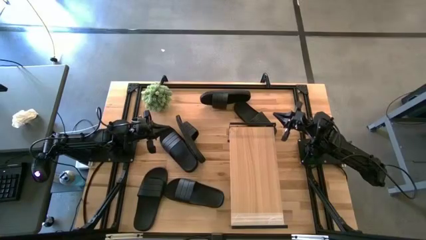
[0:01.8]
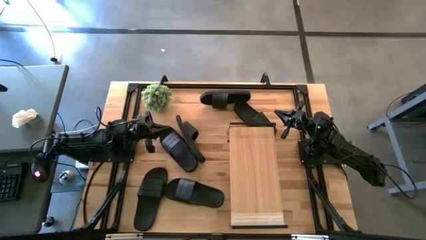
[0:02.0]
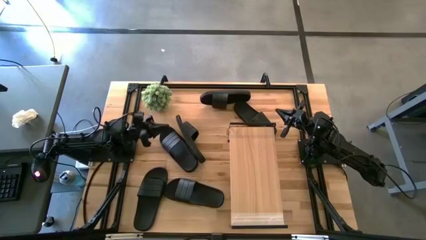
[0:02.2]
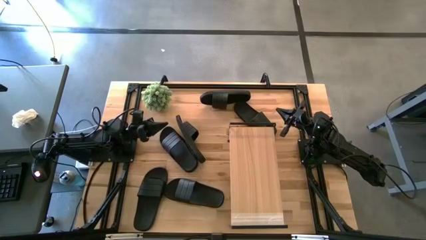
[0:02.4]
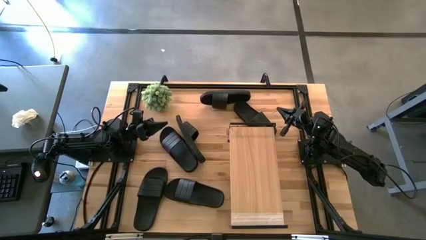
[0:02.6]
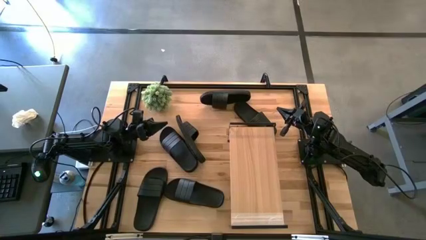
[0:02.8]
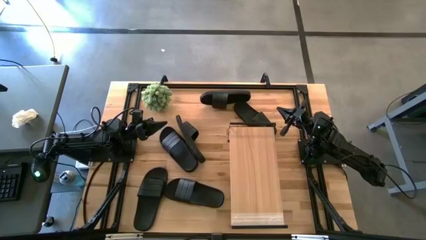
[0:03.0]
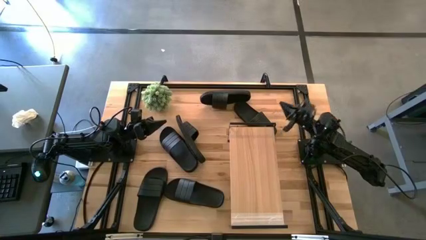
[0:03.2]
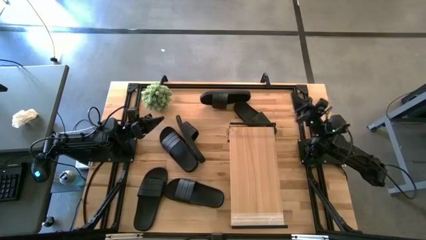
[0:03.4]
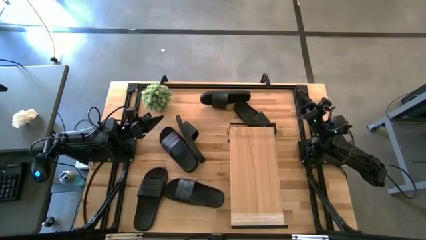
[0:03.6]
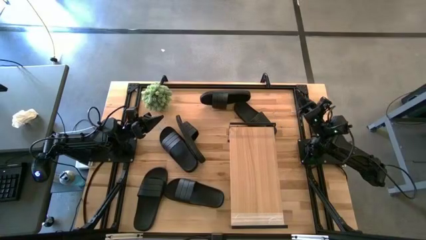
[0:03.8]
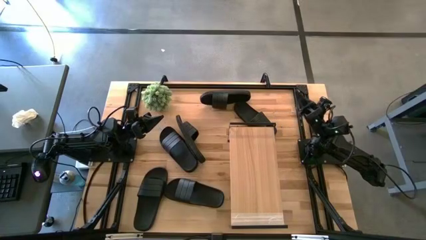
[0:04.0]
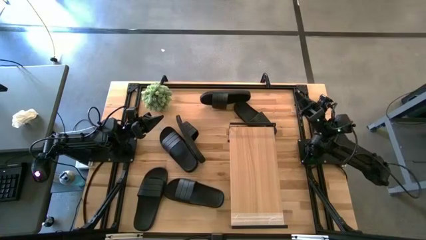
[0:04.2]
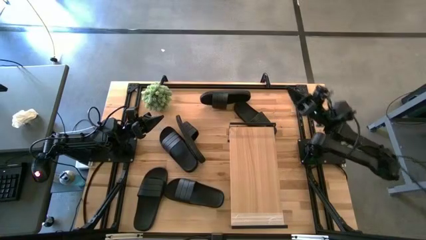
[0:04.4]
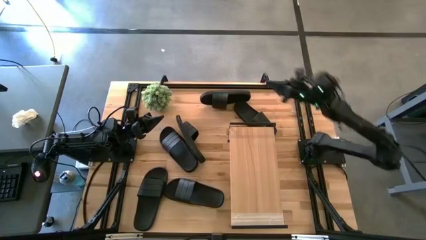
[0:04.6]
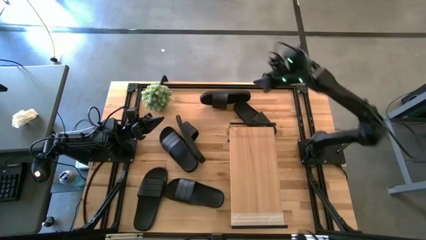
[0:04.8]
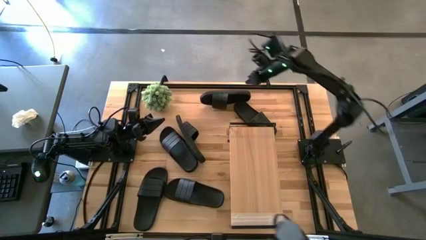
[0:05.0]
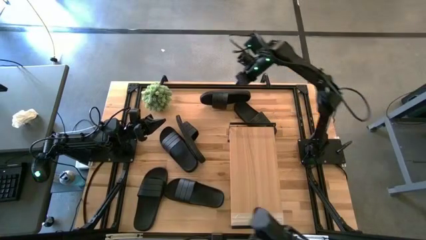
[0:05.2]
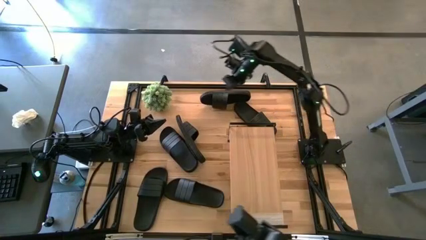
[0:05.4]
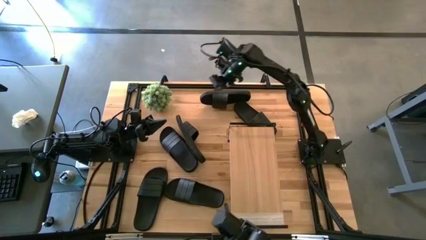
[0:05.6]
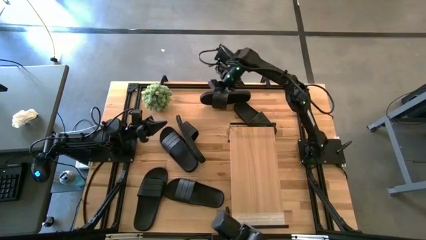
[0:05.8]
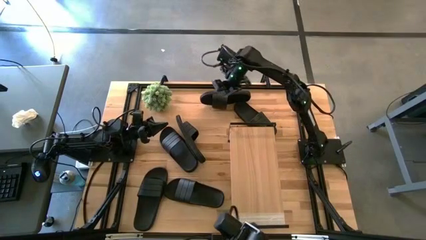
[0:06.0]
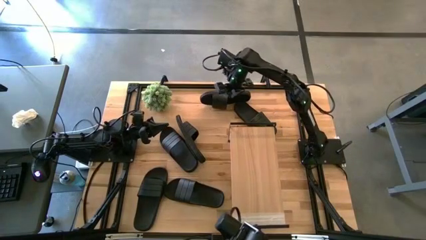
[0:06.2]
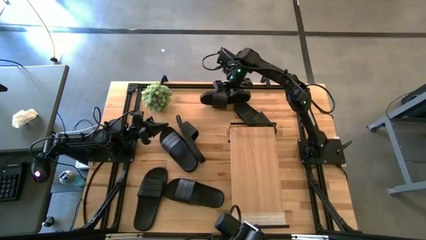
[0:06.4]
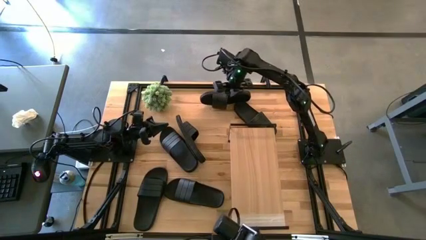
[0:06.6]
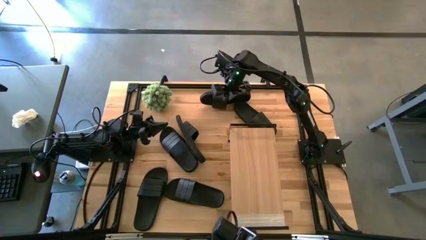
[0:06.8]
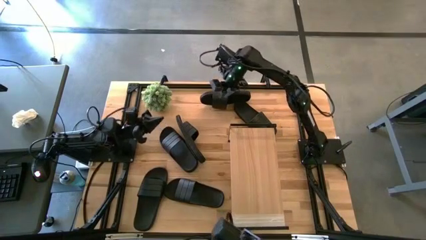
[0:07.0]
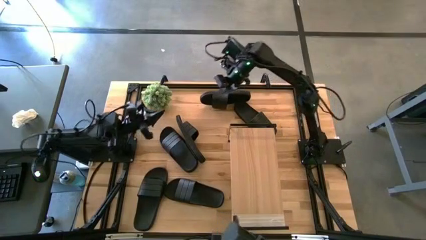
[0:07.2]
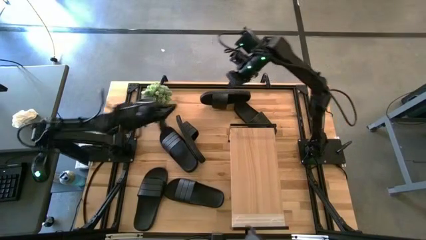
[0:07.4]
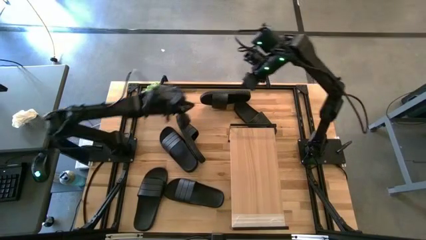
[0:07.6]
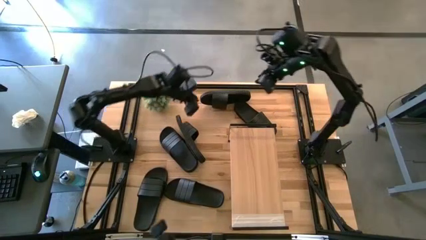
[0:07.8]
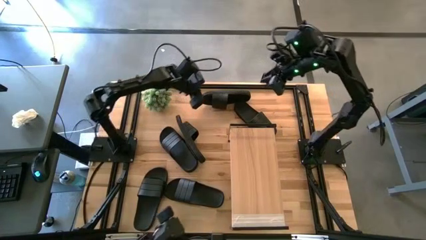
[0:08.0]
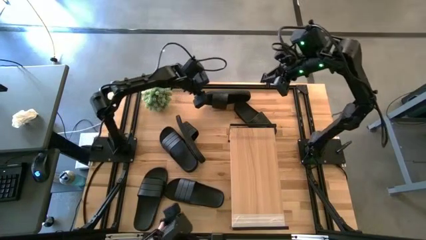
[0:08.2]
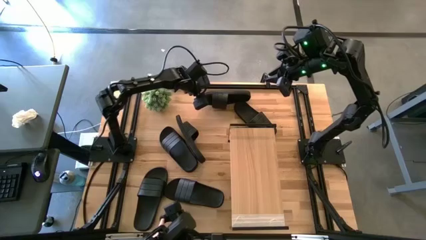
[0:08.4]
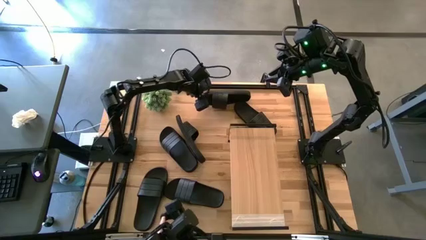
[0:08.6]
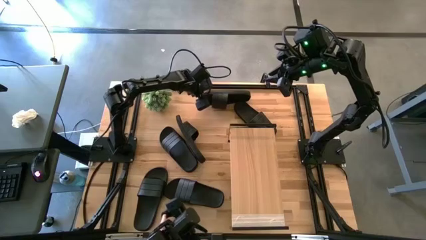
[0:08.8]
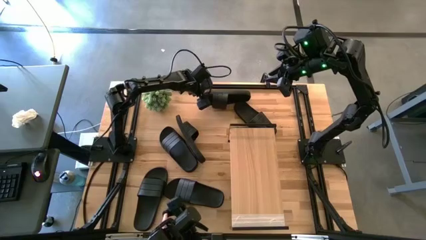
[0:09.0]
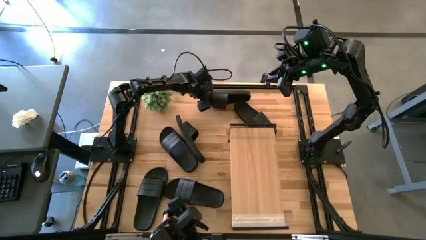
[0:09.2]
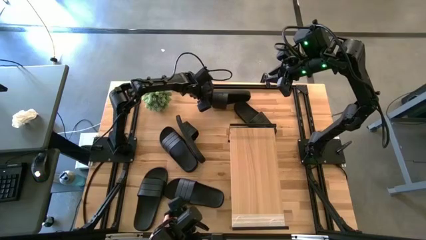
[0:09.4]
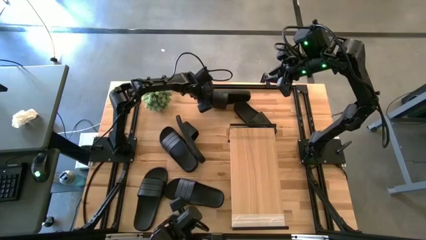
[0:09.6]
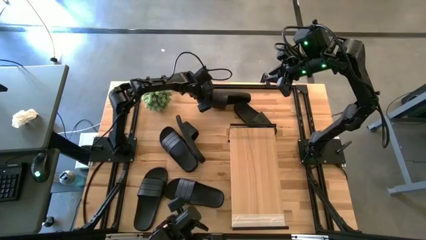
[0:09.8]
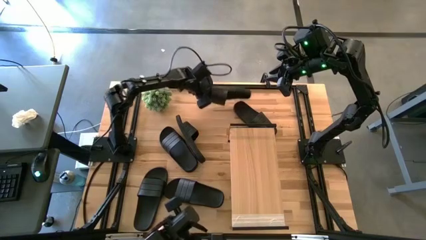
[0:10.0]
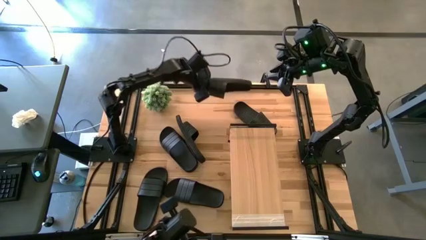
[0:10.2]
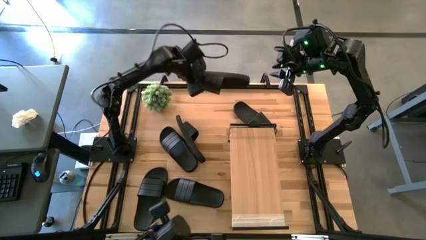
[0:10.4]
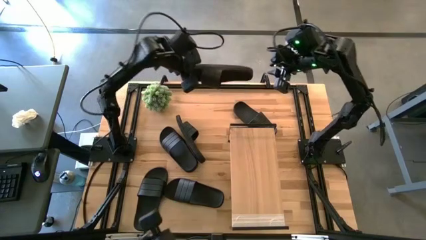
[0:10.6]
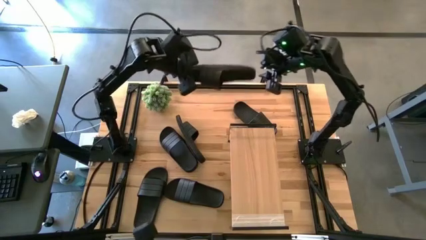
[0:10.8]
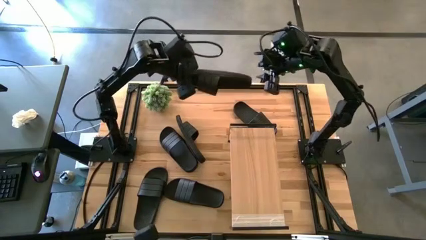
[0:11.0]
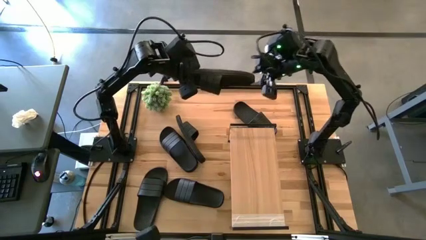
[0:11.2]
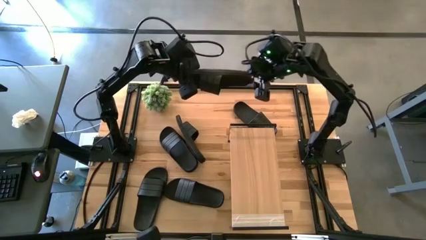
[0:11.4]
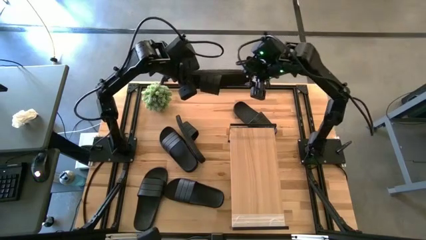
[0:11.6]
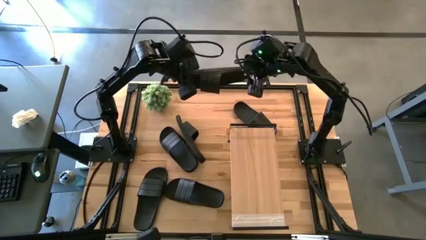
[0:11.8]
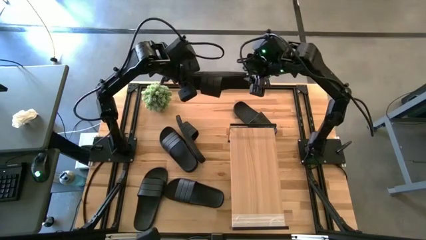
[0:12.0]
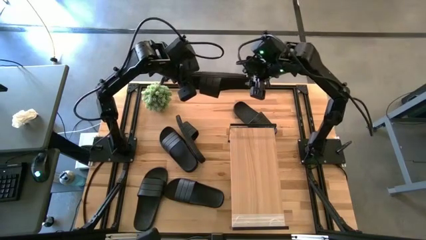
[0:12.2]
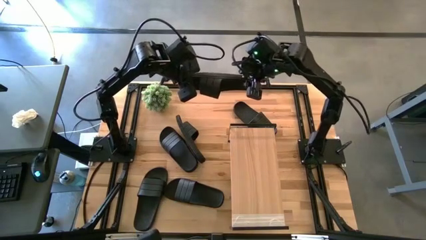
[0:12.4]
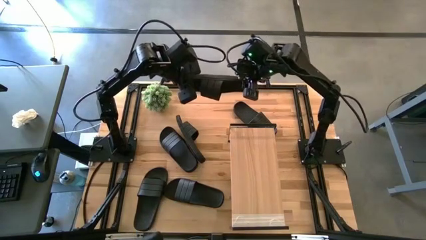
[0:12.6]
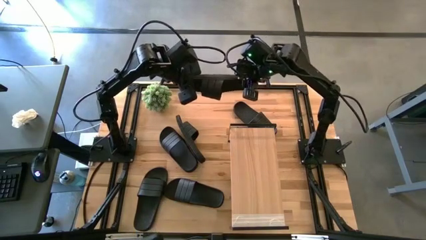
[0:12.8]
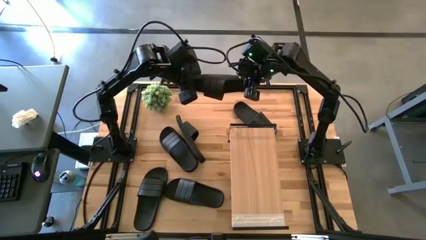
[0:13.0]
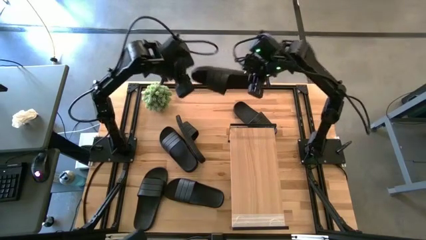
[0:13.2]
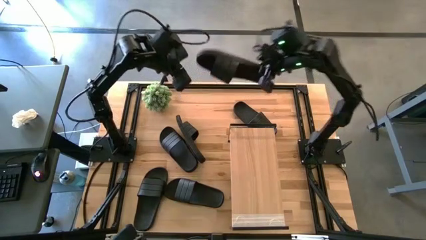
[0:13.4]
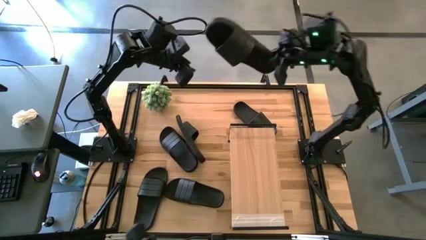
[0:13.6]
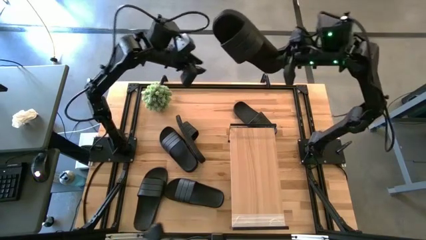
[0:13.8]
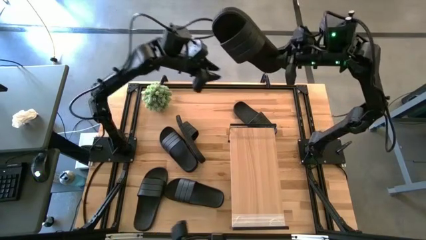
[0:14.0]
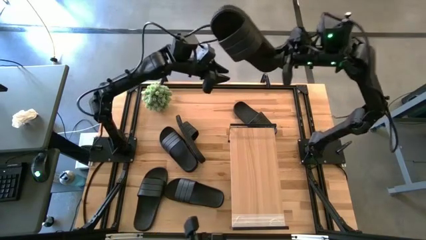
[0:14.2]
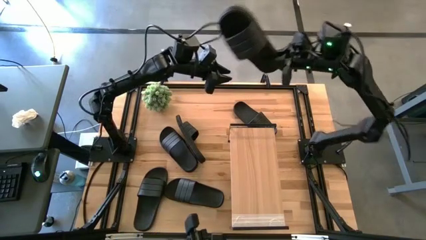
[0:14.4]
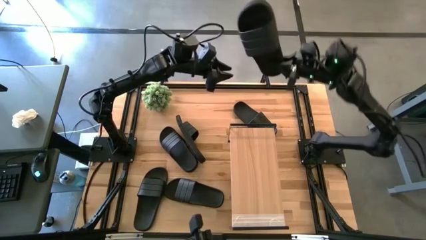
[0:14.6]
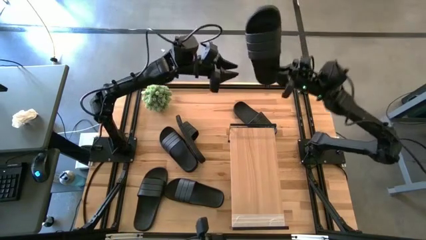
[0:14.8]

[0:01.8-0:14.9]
Task: Pick and place slides into the shelf
Put the black slide under the shelf
